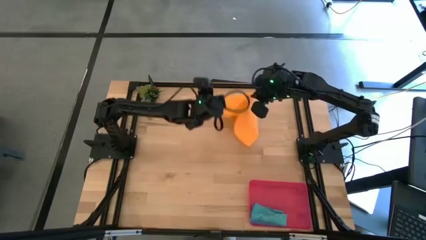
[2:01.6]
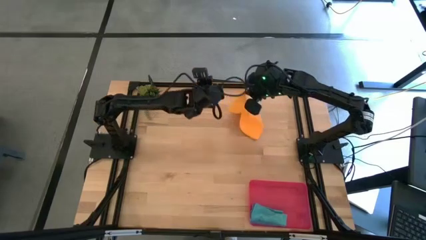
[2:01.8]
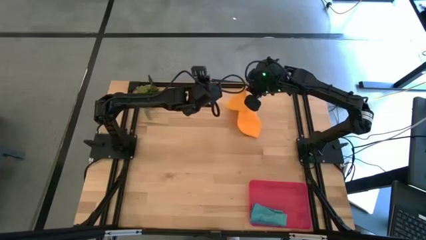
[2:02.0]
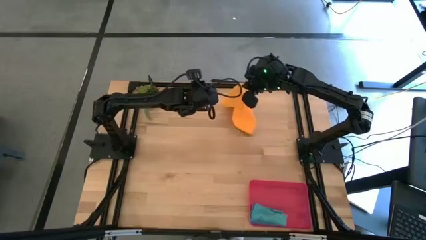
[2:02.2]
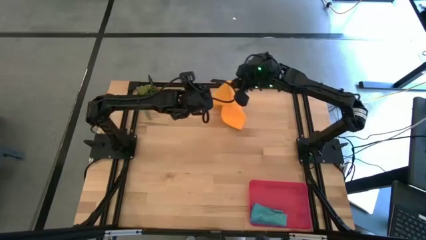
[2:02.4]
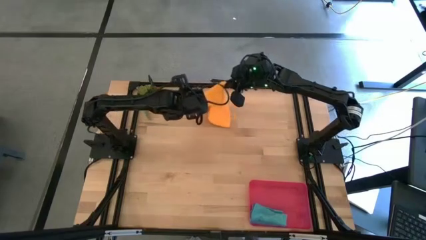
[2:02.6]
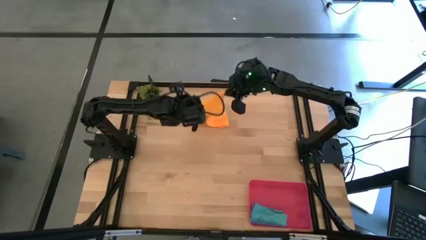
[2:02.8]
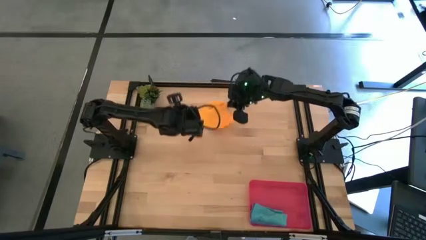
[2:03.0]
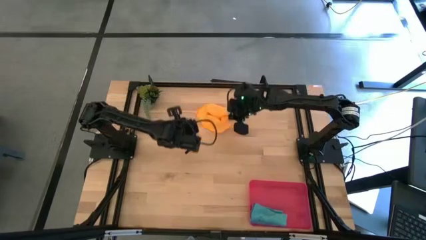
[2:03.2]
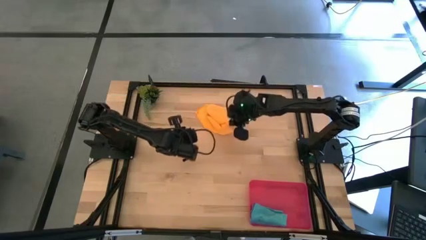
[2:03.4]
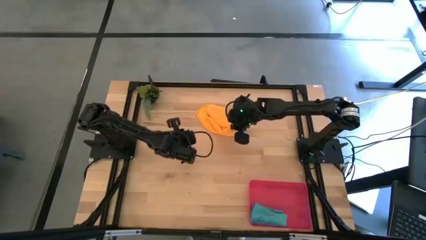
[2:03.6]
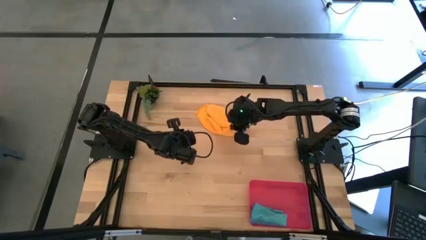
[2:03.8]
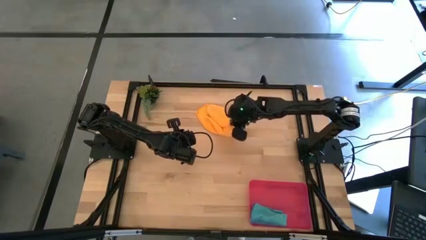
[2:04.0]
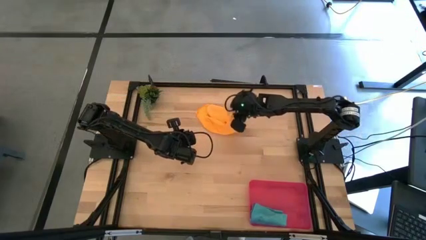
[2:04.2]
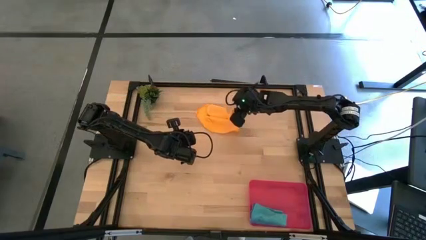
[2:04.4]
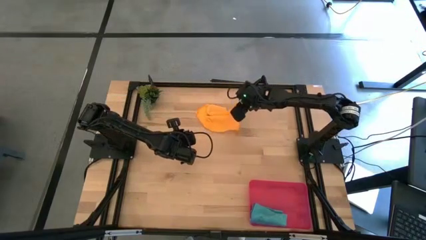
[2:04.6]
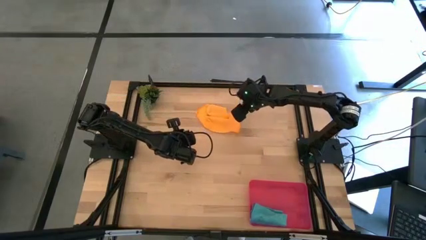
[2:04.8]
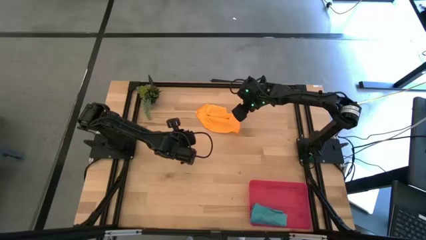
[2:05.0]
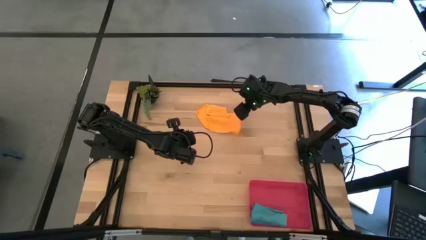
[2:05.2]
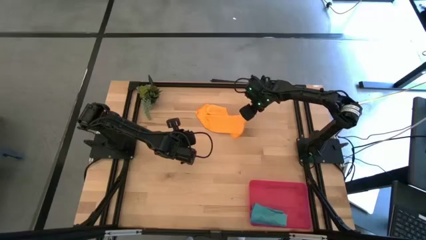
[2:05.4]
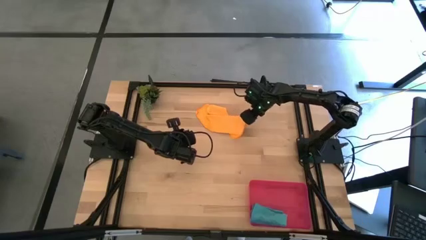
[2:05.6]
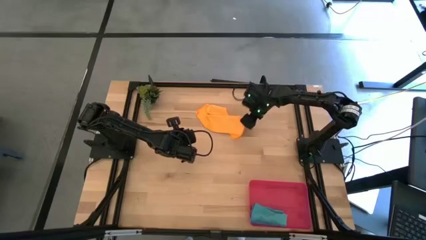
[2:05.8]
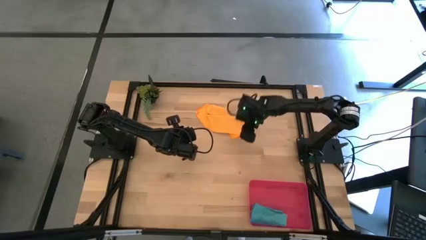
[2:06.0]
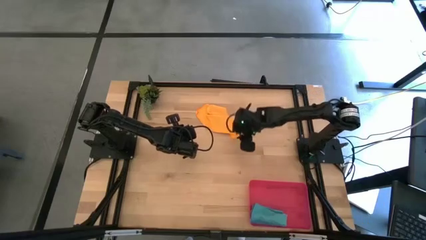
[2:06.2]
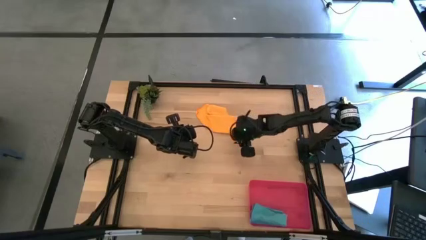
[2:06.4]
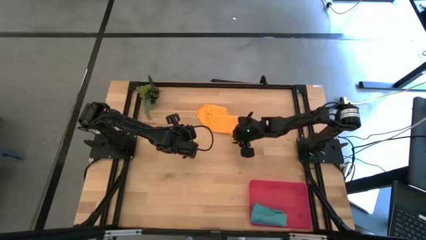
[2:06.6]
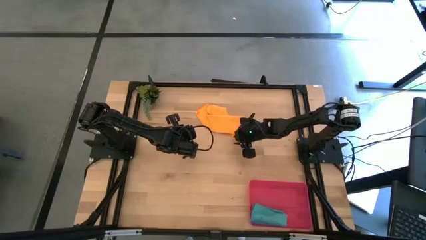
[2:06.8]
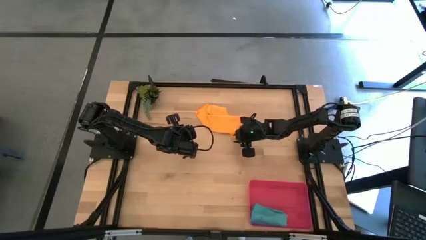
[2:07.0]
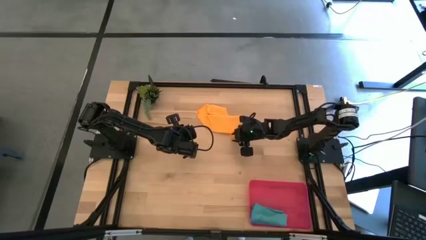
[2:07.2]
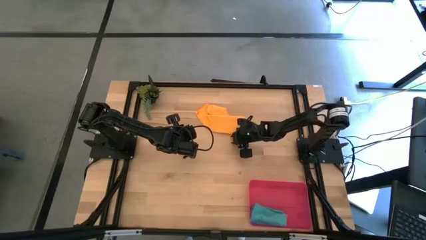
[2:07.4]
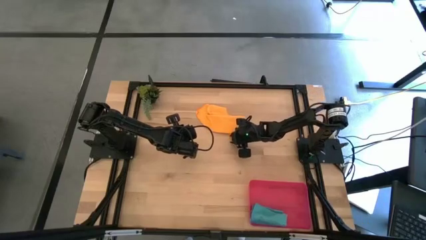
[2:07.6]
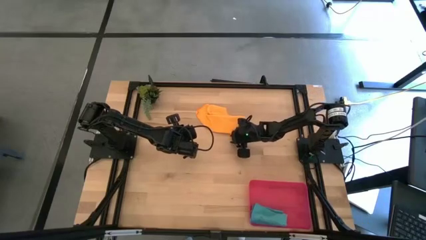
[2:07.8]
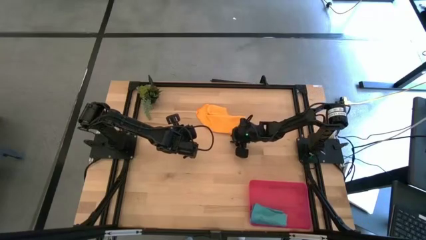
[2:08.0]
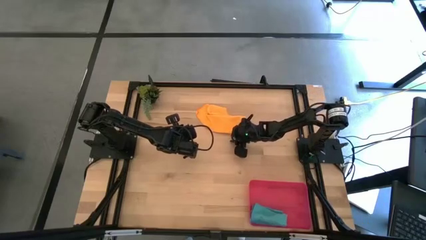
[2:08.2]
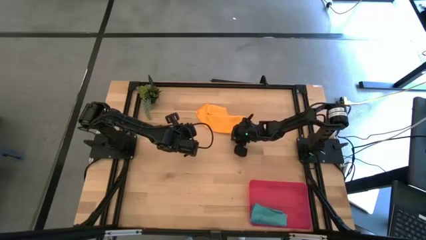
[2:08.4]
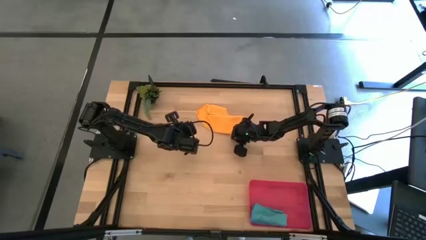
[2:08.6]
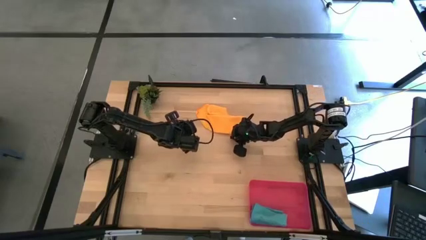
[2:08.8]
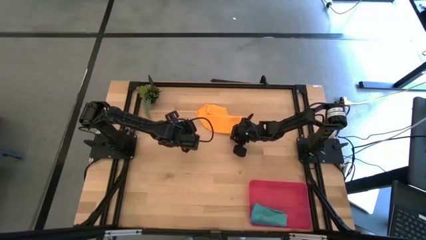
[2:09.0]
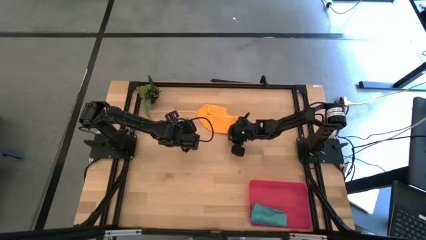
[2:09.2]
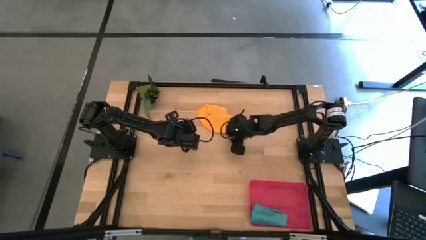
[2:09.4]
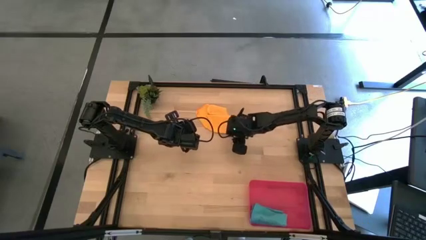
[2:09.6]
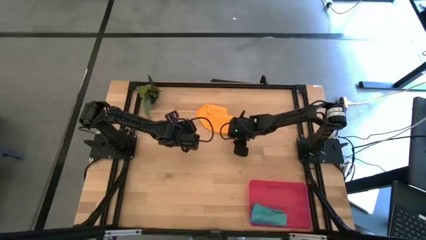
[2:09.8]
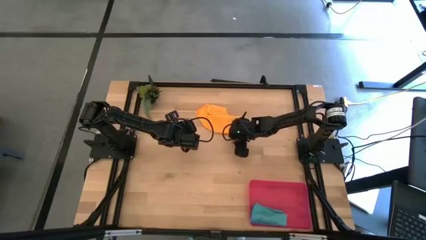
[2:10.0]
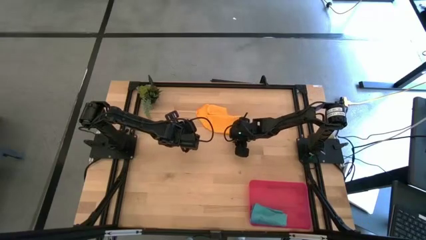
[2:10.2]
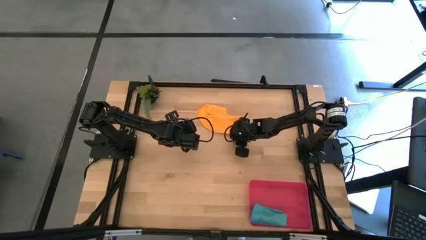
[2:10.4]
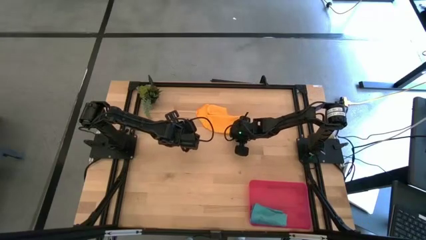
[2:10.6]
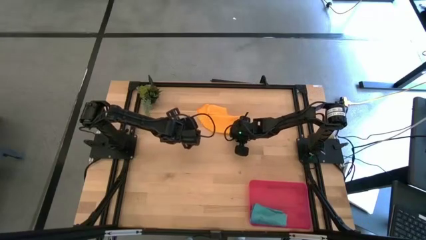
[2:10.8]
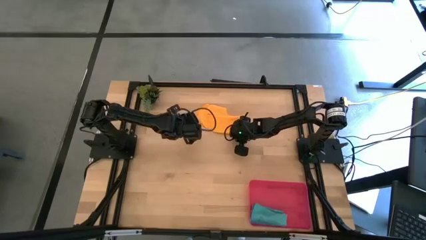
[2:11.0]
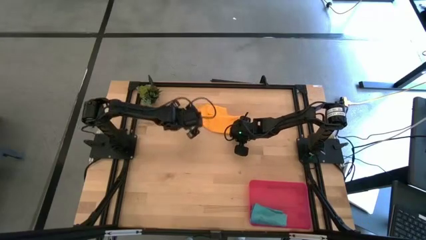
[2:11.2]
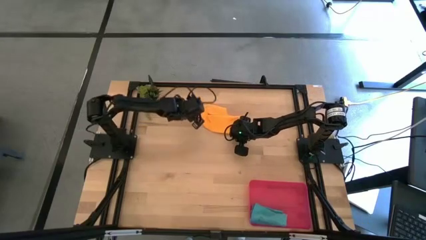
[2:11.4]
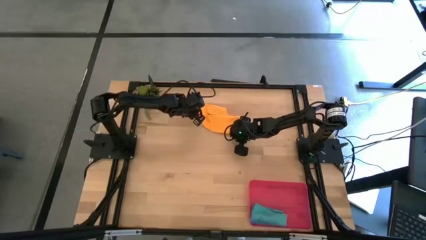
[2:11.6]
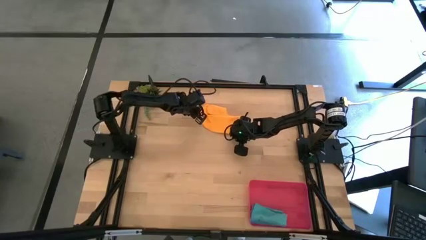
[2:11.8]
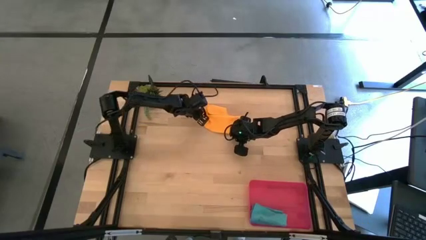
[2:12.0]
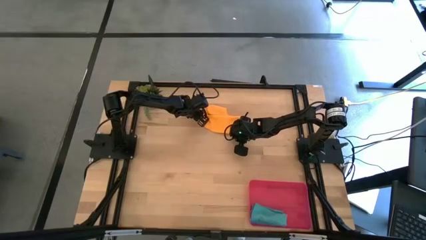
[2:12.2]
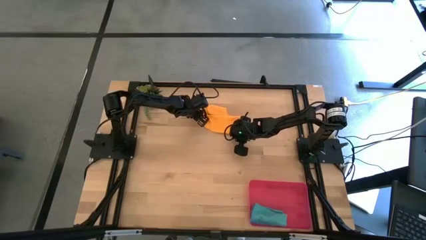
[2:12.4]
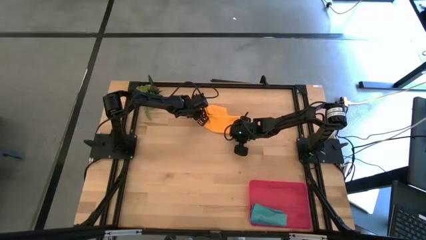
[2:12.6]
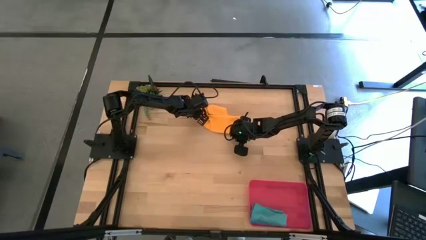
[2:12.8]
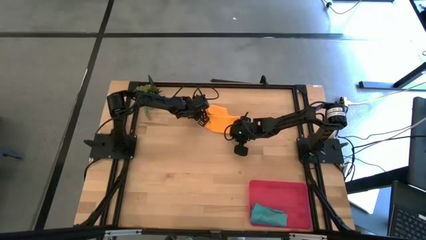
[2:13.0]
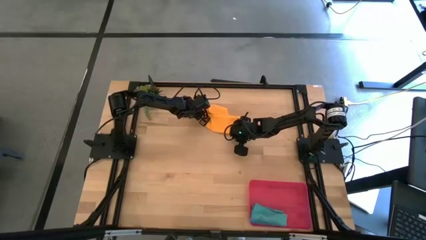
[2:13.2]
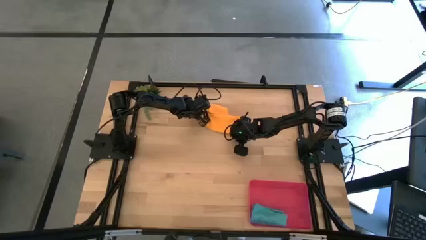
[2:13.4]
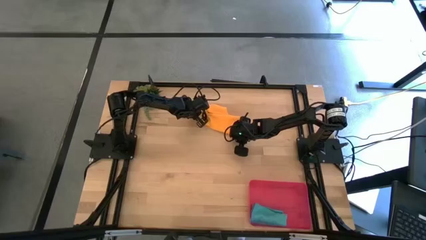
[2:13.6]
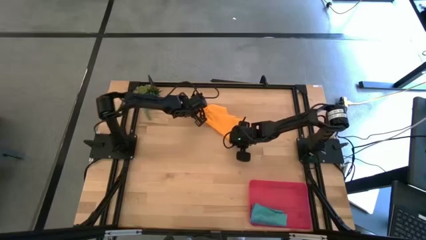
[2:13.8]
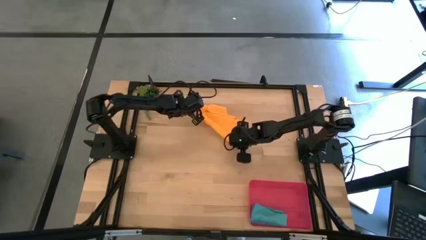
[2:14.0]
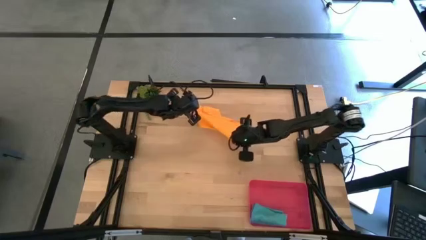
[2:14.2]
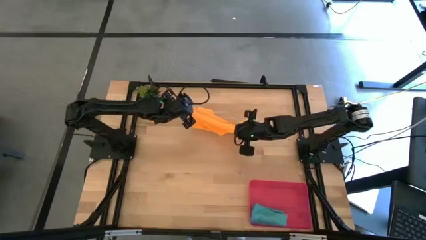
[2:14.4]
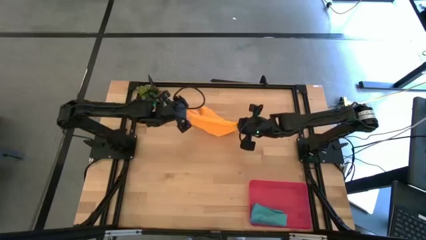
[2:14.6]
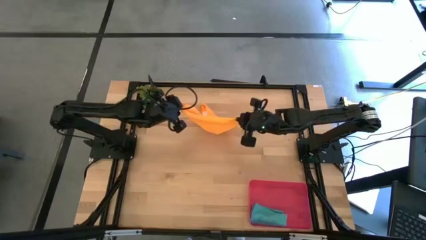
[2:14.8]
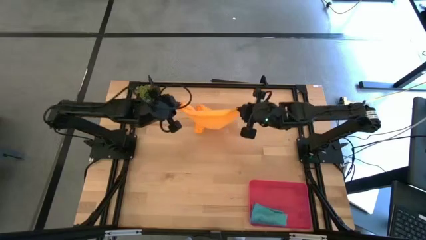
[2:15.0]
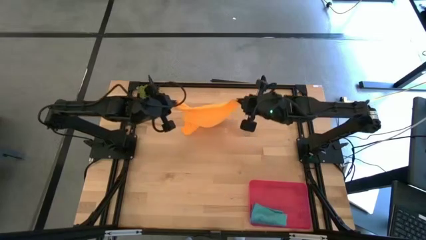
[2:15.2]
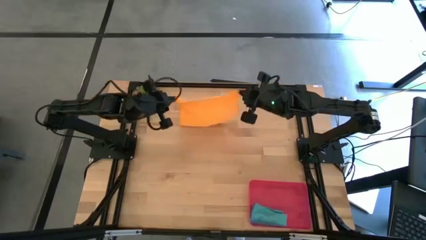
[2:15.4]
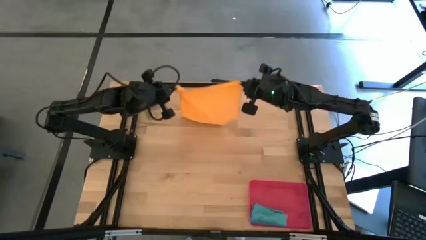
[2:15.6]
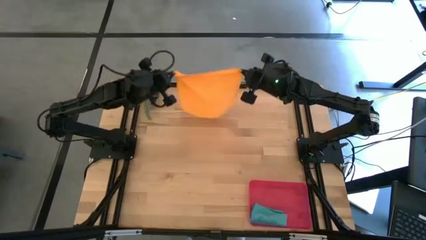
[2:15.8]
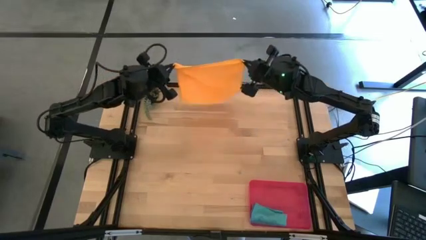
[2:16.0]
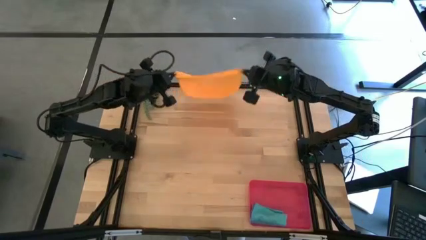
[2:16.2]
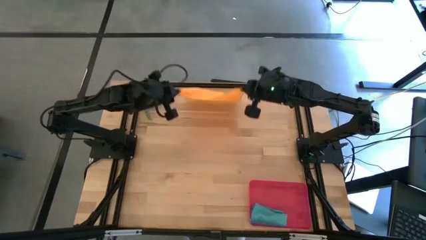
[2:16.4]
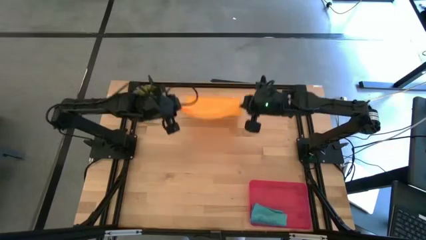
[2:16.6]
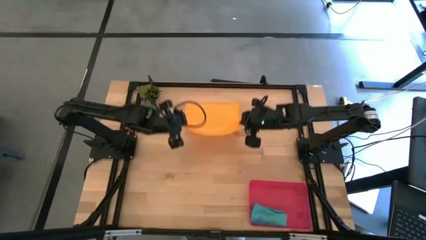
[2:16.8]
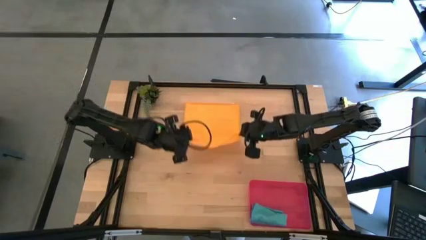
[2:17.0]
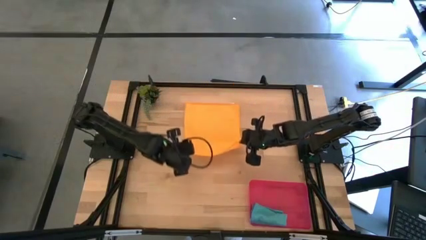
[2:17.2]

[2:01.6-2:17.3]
Task: Roll microfiber towels into tight, uniform cylinder then place into a basket
Fold the orange microfiber cloth
